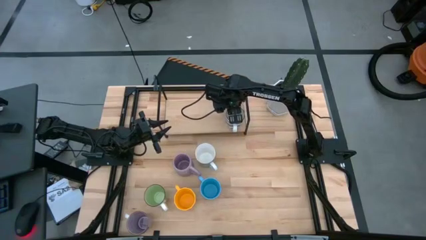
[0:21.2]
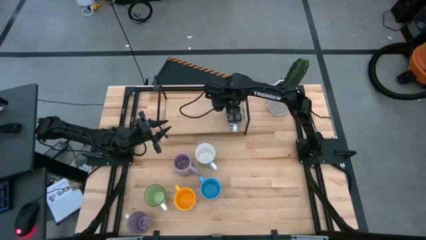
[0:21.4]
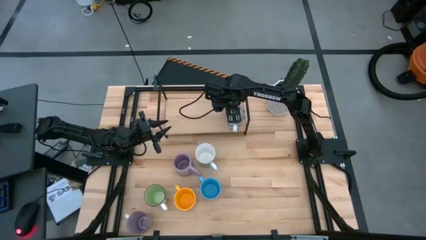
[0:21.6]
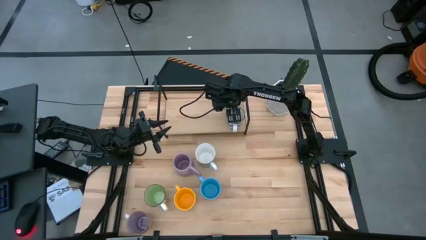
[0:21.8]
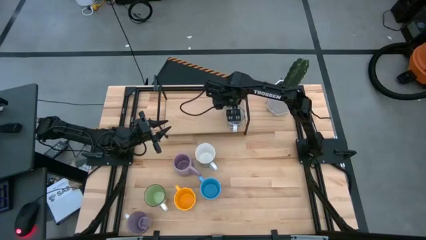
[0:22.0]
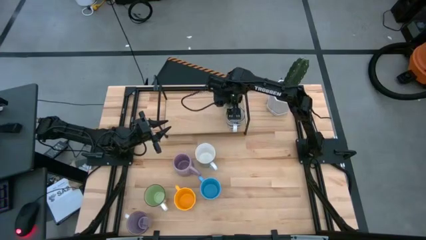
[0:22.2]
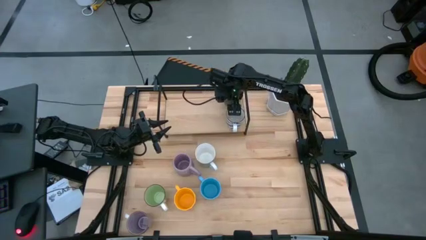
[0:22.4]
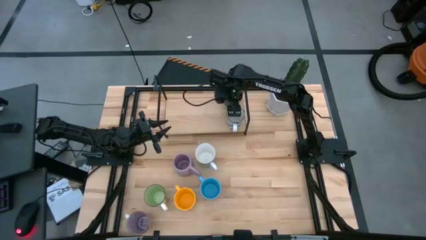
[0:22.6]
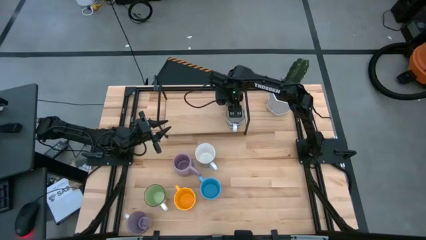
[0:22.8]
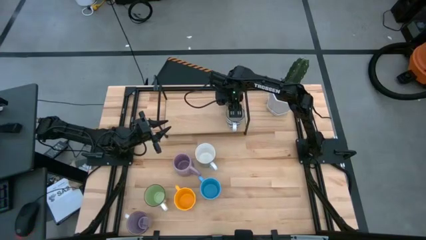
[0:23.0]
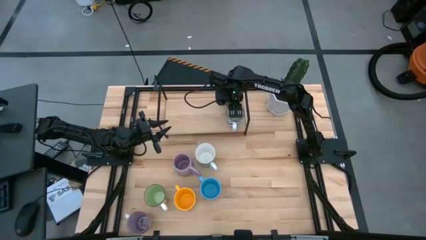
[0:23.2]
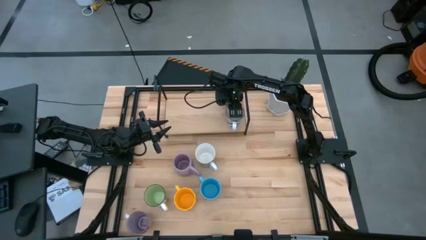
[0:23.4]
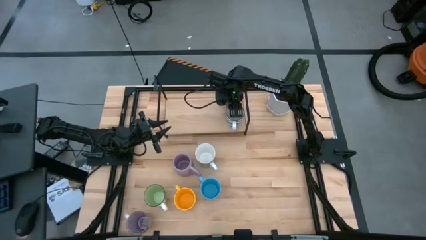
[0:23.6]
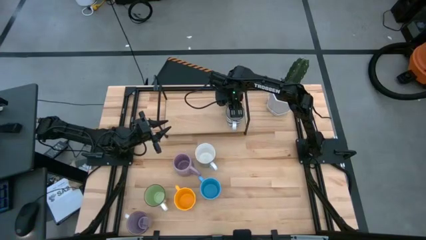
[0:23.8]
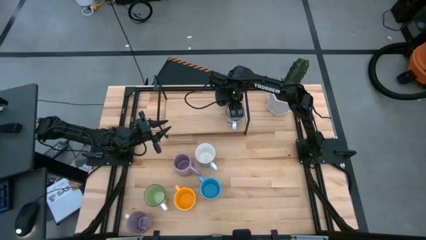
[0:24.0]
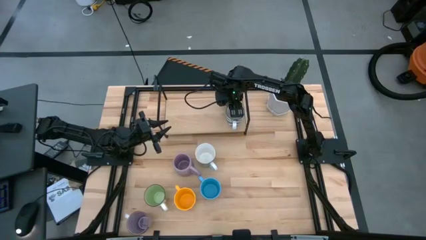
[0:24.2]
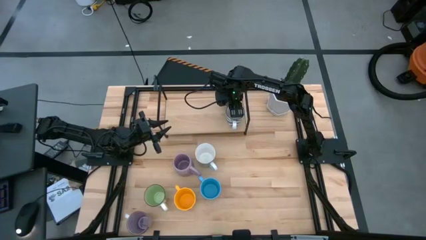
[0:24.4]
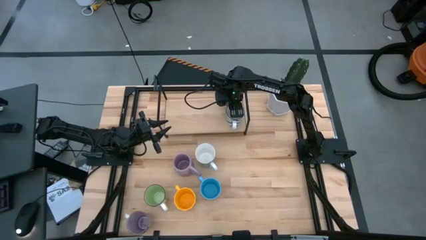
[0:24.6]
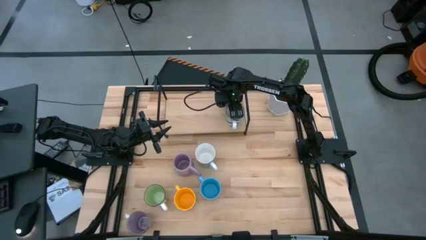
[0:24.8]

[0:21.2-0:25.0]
Task: Place coffee mugs
Adjust the mugs

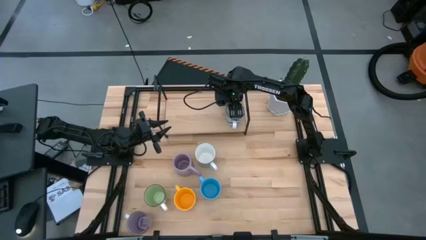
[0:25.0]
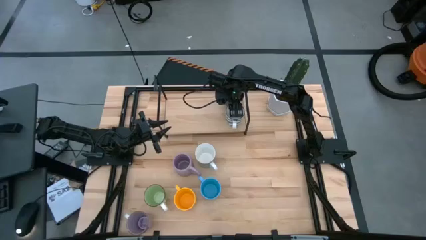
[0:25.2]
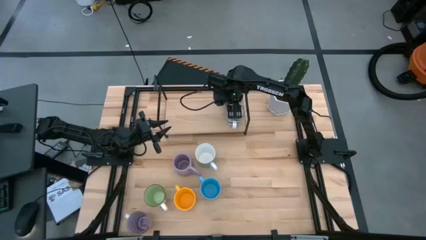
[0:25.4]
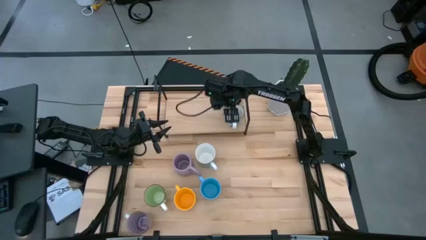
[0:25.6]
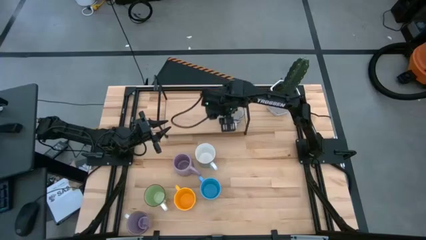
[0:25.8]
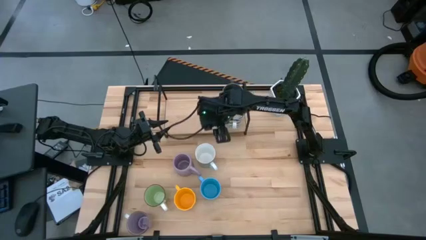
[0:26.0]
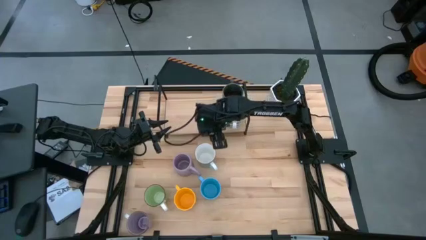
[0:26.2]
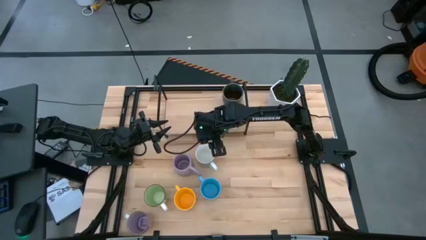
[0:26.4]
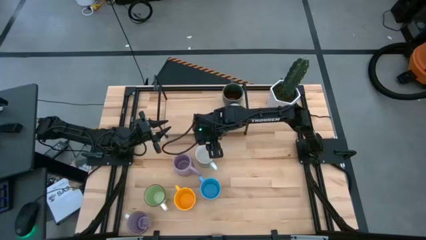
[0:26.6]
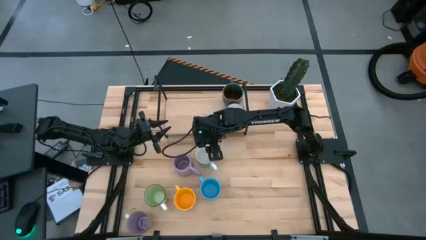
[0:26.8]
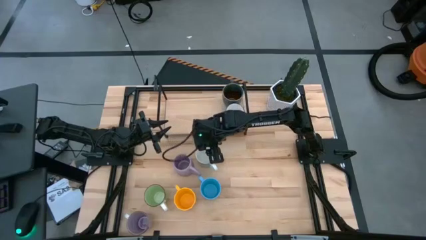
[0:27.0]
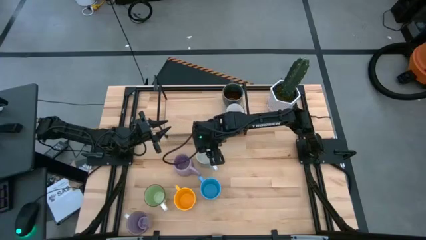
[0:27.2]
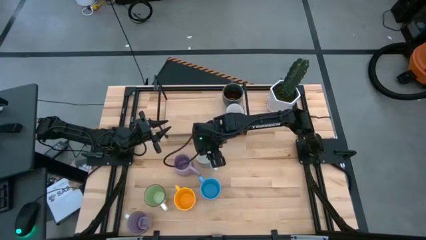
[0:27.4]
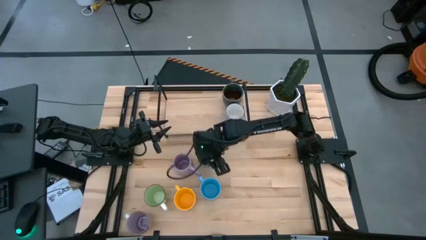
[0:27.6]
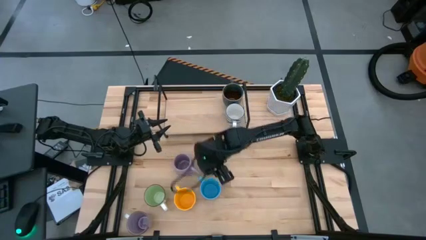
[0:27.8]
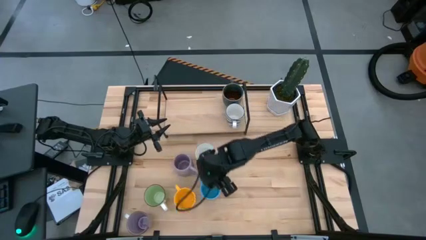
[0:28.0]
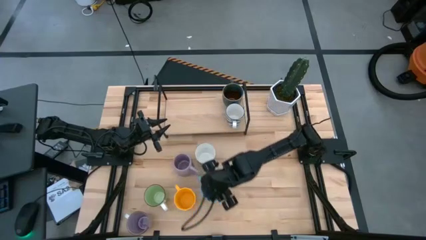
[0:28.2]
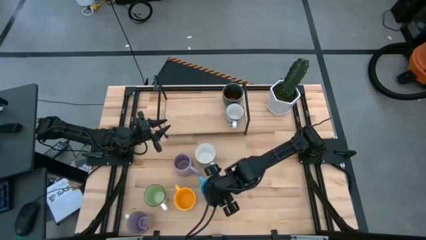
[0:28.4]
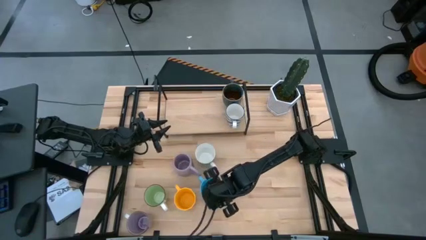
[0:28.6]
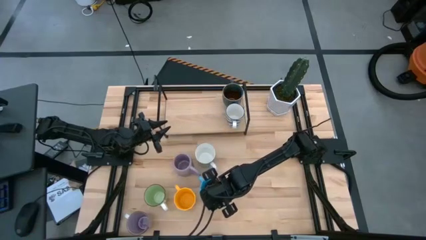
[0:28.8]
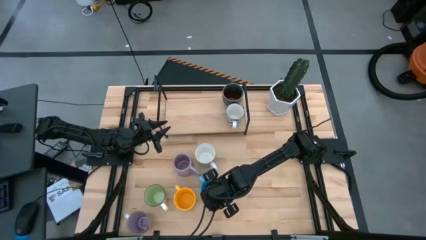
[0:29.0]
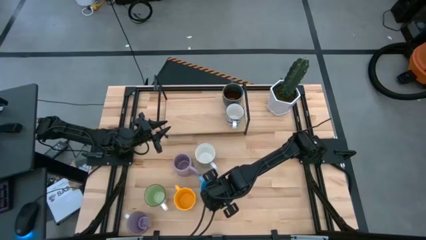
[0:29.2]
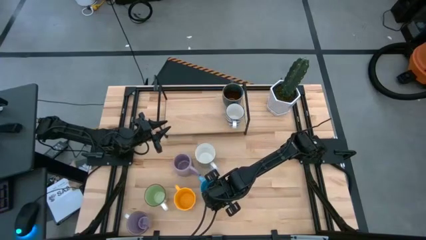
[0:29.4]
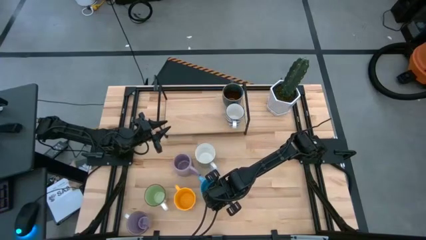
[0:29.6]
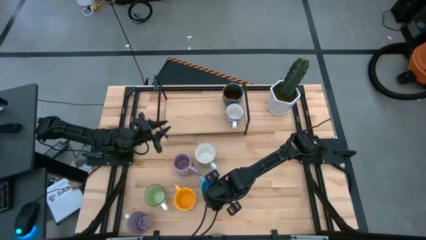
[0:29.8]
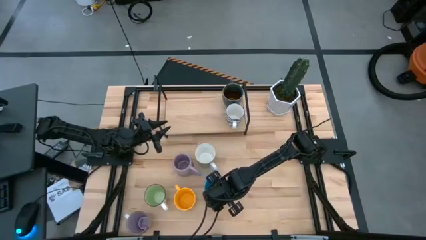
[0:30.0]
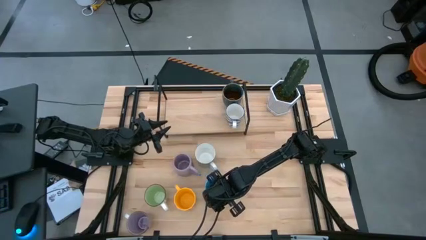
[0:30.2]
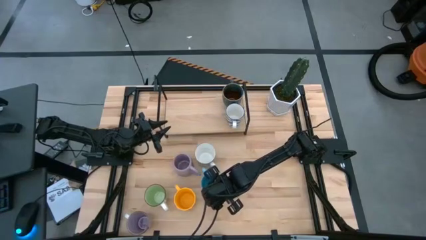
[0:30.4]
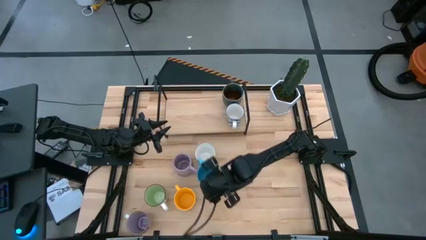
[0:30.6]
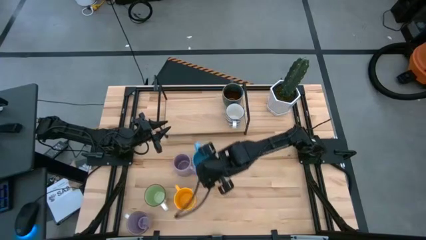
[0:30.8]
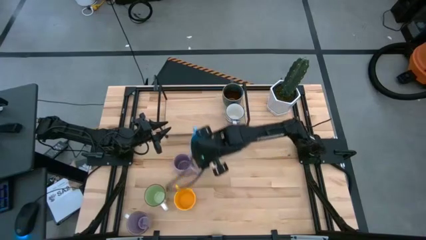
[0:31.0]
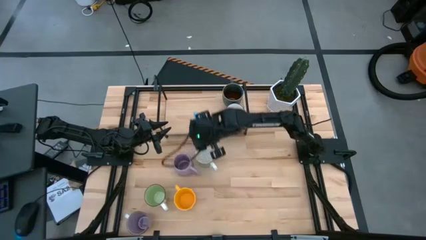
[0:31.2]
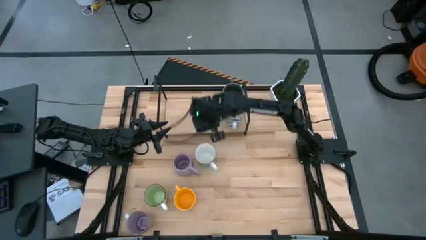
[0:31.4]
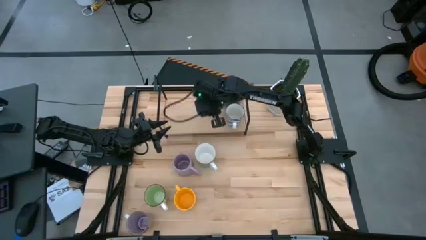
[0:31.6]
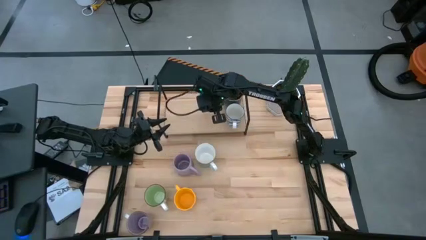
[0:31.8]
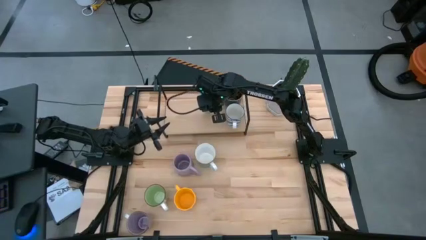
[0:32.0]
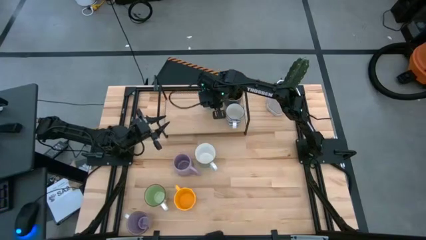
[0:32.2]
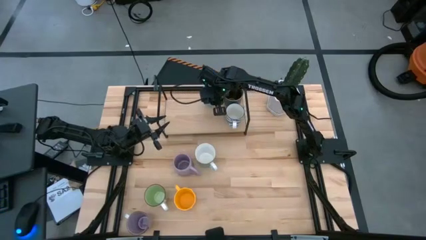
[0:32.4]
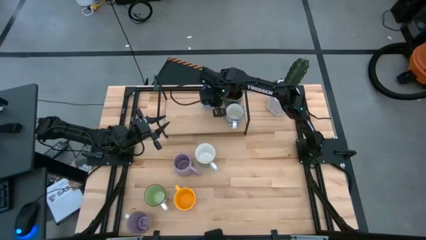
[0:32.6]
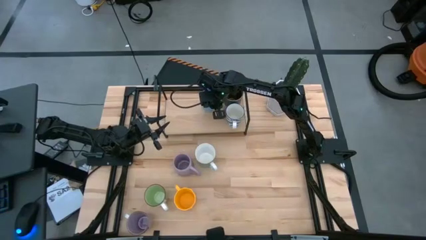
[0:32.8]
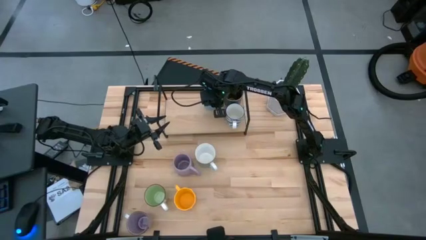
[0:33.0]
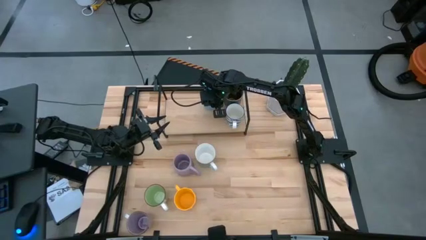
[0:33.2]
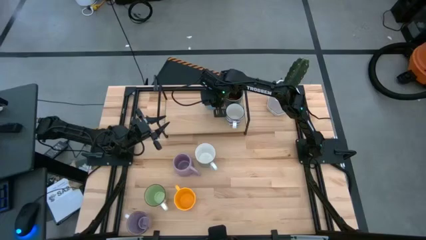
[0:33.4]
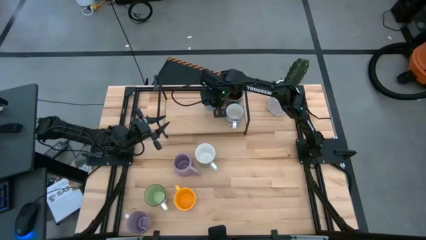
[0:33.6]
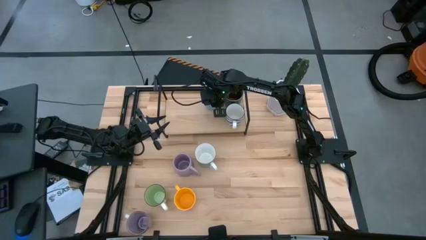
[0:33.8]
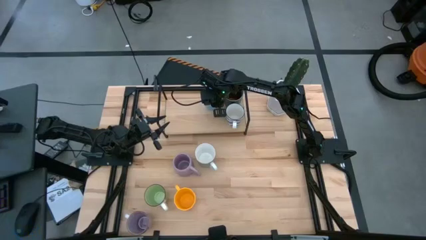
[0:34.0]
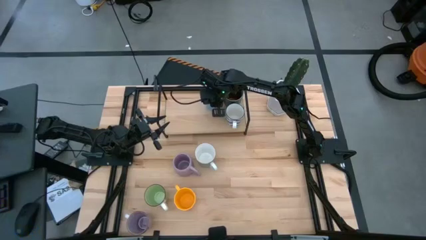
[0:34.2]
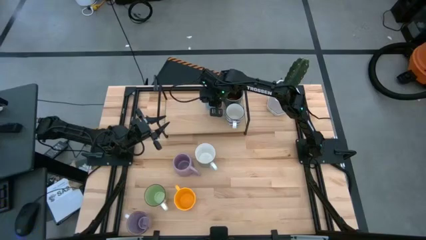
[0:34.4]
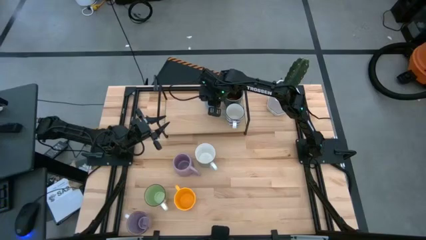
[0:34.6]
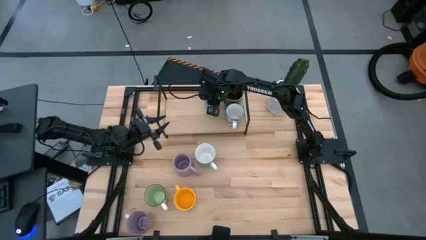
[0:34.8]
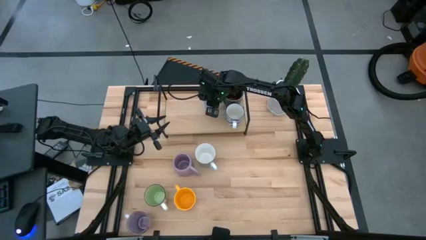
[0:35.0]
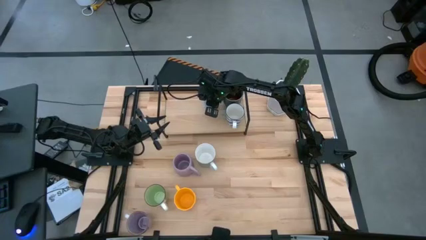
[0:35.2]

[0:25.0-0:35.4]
Put the light blue mug on the shelf

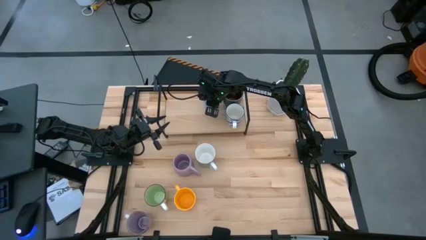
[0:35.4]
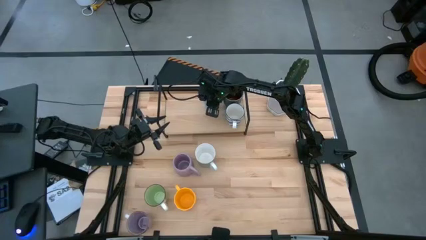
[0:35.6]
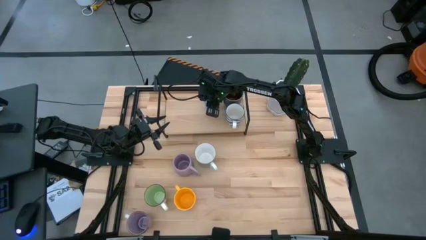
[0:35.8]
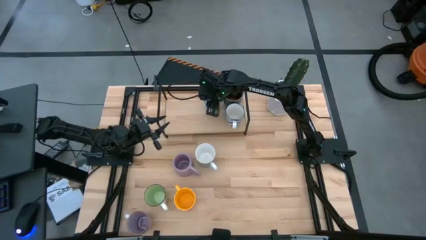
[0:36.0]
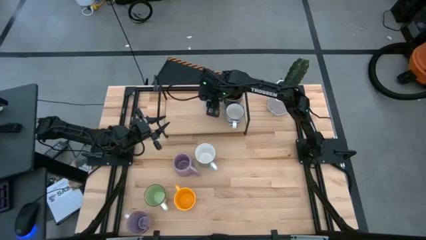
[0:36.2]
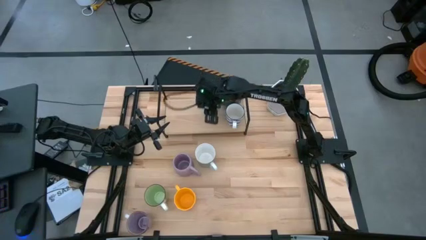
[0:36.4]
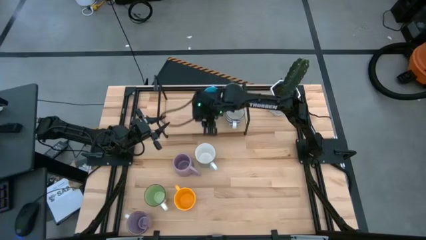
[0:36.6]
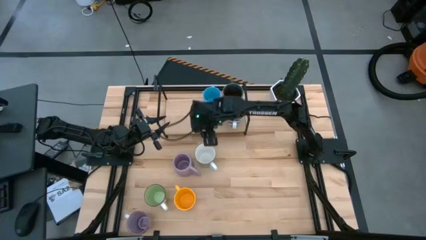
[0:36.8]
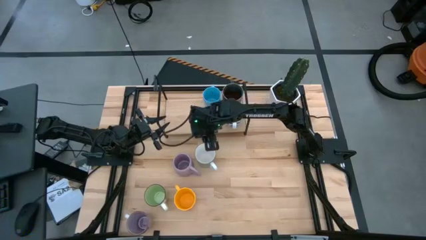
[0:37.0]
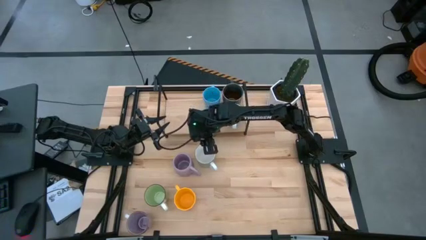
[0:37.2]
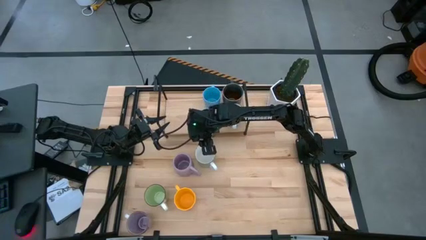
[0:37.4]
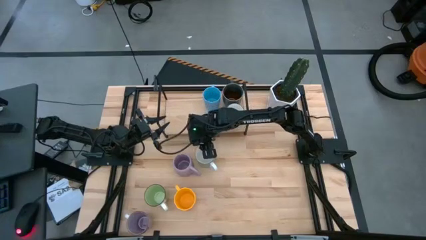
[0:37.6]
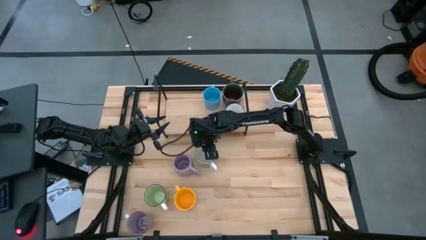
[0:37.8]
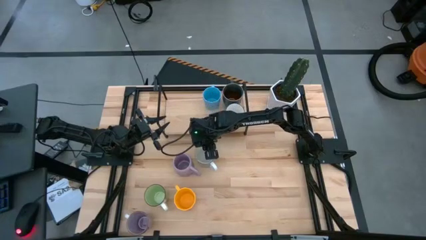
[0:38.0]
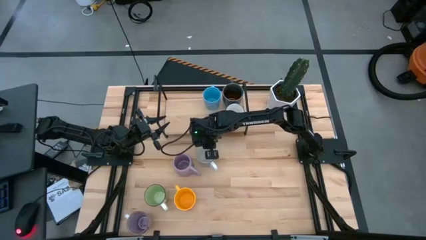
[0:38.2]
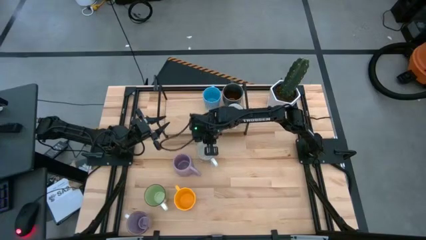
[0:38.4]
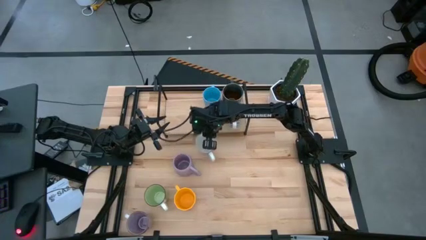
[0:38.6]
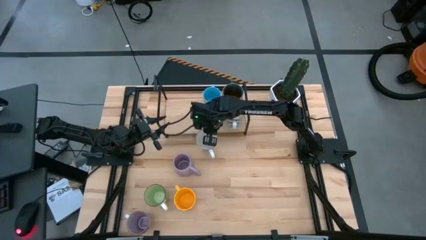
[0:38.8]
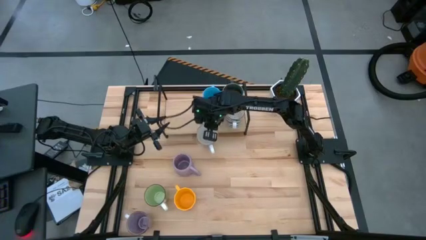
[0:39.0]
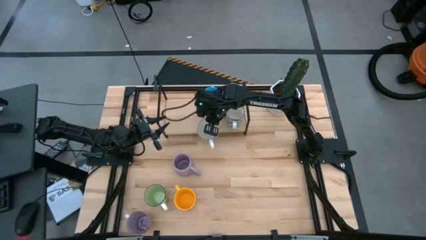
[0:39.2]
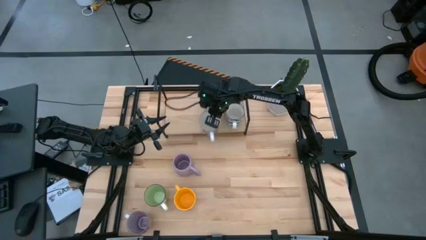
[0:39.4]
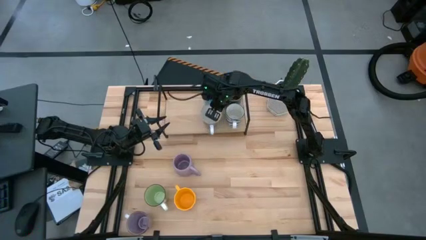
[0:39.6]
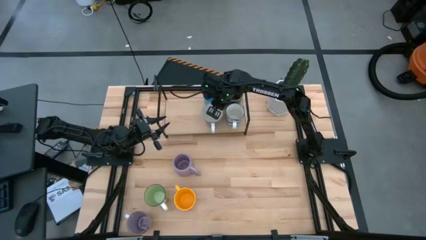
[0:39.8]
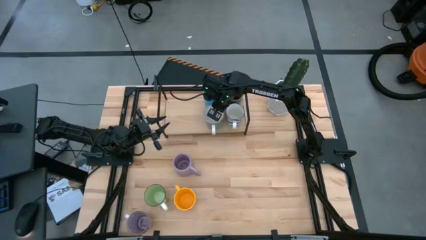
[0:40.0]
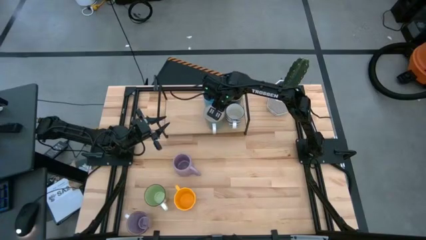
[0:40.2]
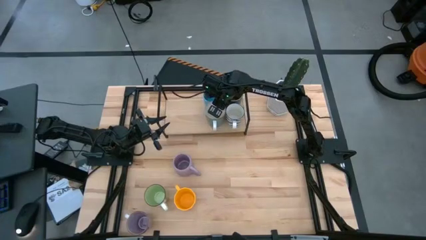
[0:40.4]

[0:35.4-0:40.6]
Put the green mug on the shelf
